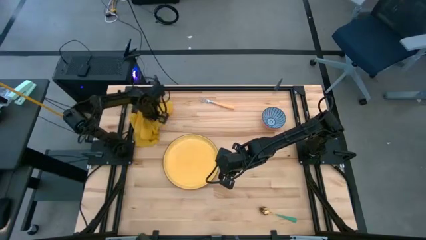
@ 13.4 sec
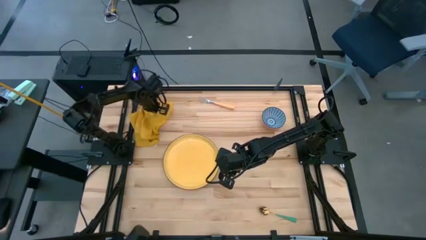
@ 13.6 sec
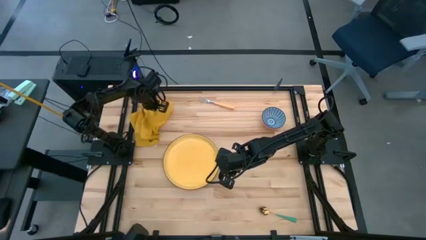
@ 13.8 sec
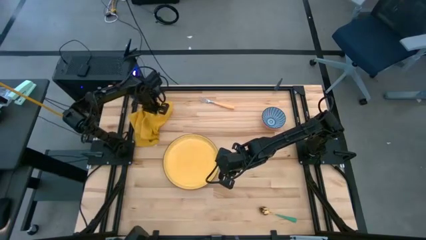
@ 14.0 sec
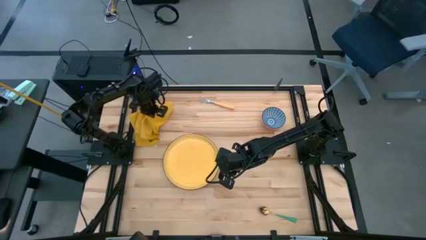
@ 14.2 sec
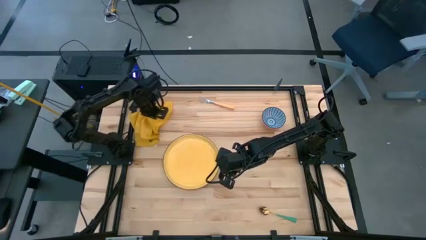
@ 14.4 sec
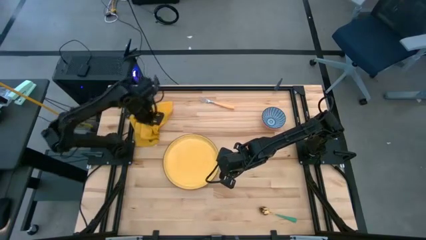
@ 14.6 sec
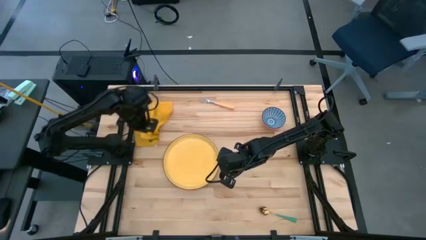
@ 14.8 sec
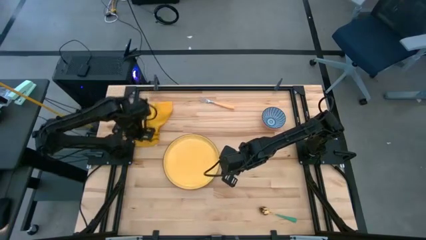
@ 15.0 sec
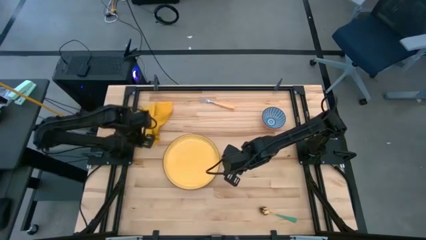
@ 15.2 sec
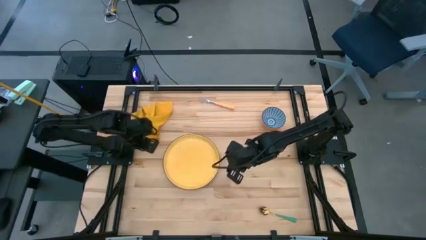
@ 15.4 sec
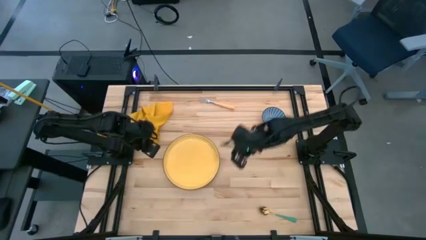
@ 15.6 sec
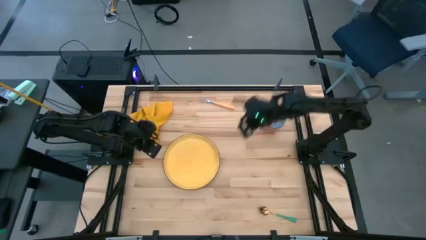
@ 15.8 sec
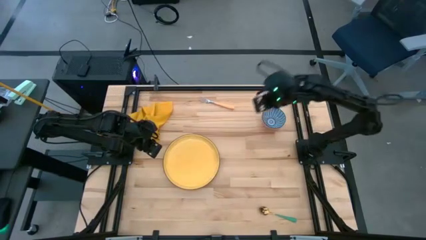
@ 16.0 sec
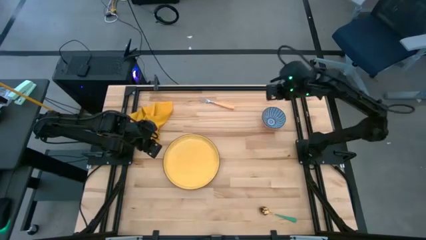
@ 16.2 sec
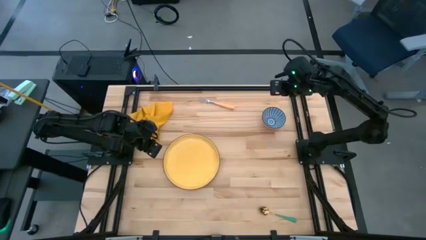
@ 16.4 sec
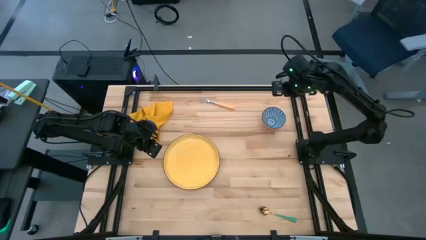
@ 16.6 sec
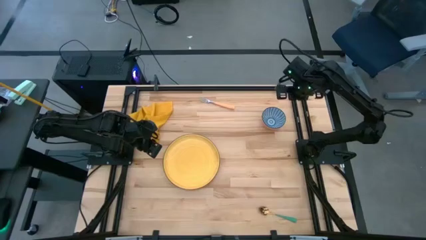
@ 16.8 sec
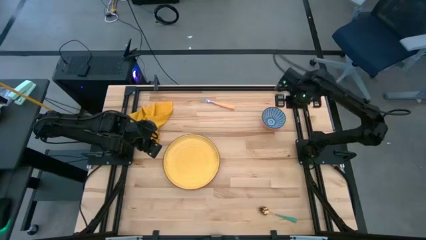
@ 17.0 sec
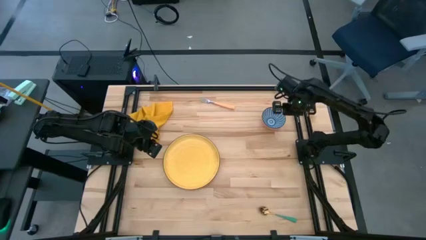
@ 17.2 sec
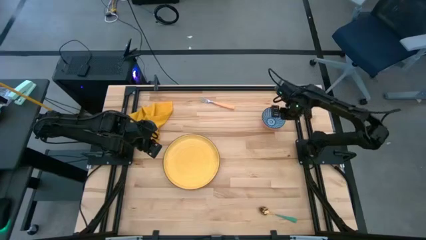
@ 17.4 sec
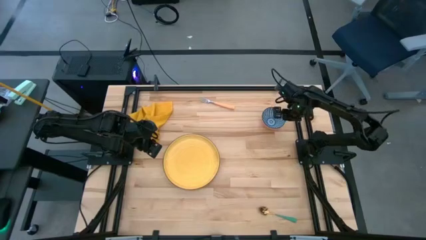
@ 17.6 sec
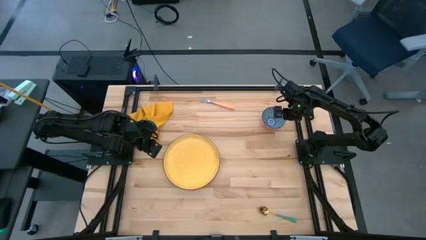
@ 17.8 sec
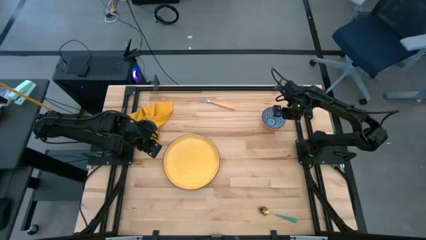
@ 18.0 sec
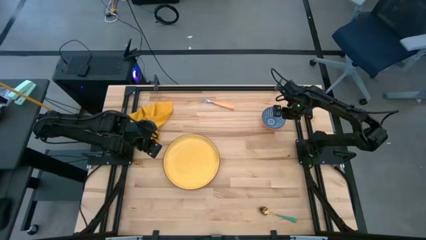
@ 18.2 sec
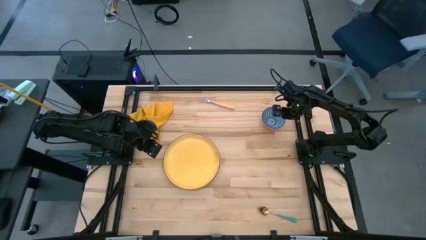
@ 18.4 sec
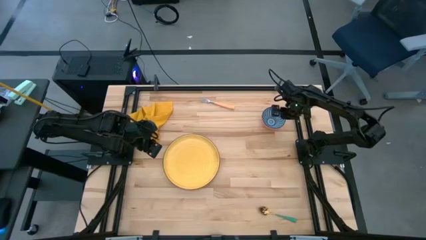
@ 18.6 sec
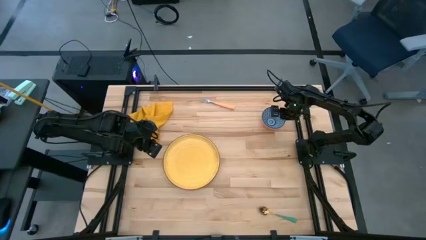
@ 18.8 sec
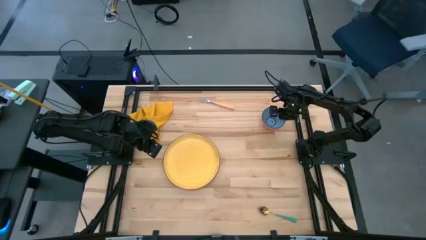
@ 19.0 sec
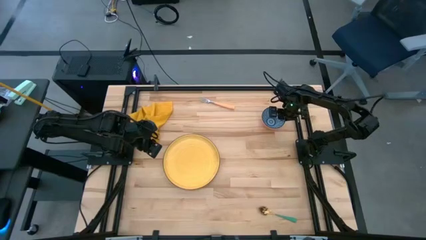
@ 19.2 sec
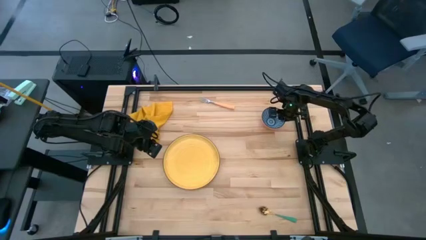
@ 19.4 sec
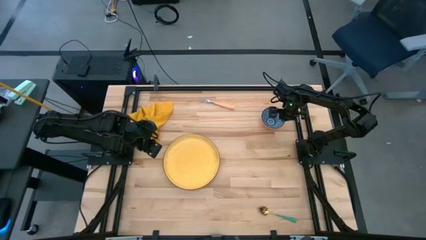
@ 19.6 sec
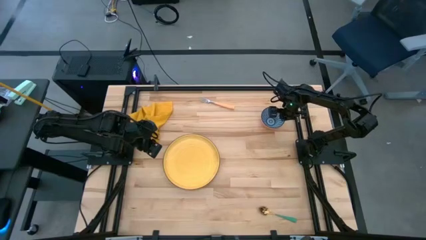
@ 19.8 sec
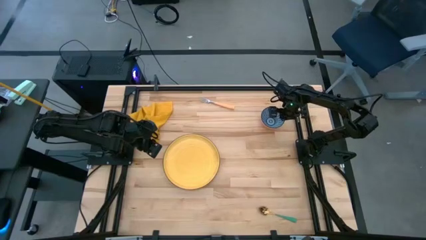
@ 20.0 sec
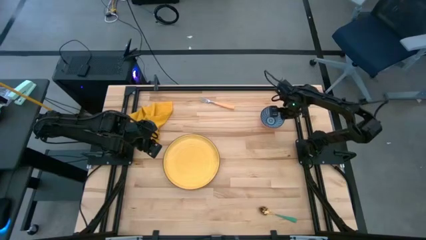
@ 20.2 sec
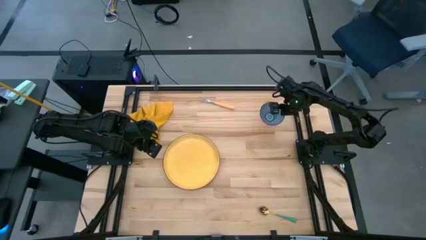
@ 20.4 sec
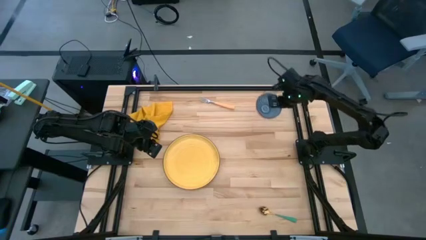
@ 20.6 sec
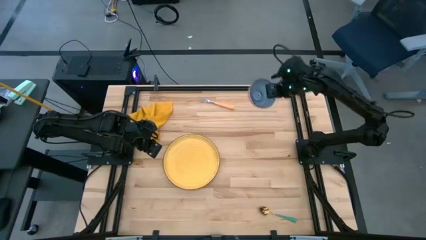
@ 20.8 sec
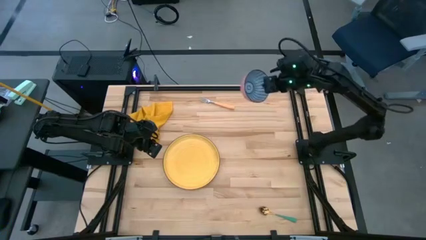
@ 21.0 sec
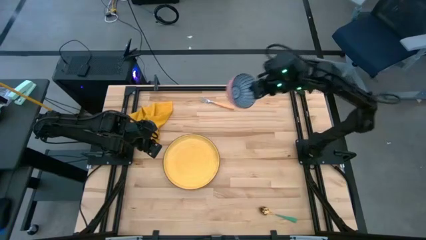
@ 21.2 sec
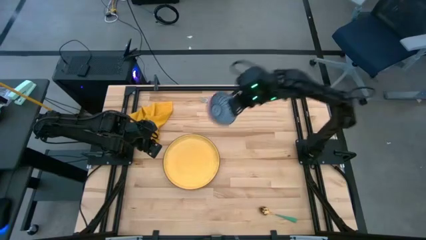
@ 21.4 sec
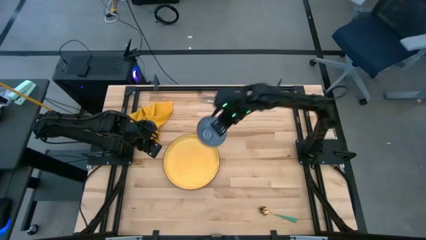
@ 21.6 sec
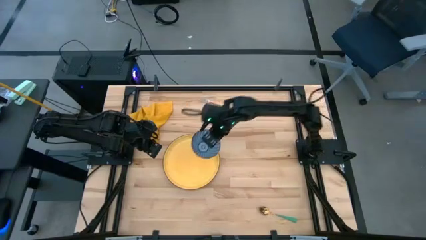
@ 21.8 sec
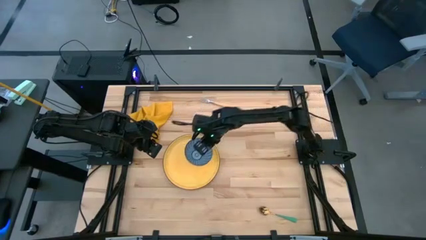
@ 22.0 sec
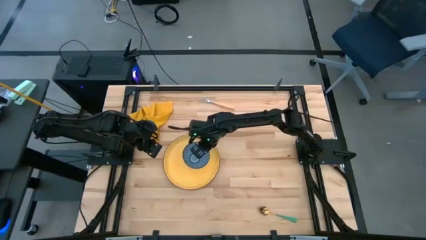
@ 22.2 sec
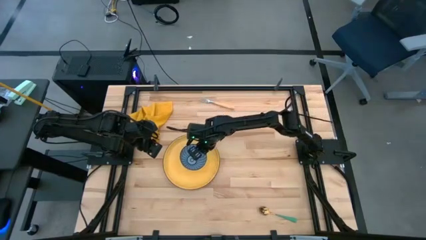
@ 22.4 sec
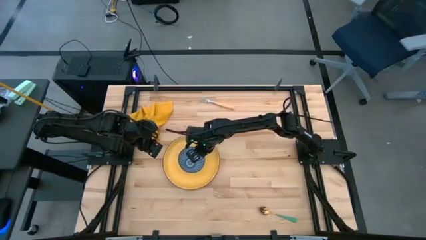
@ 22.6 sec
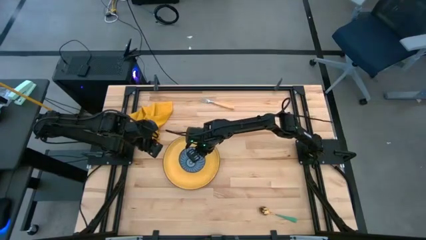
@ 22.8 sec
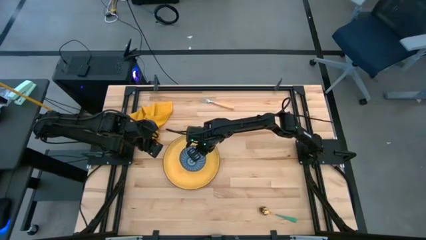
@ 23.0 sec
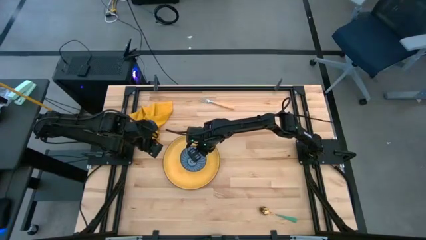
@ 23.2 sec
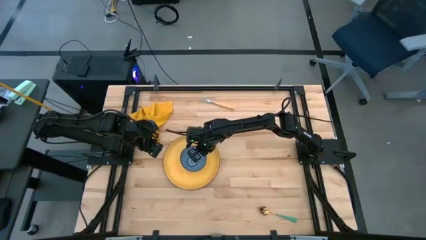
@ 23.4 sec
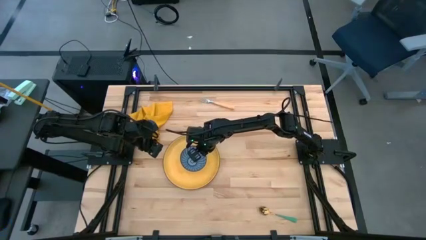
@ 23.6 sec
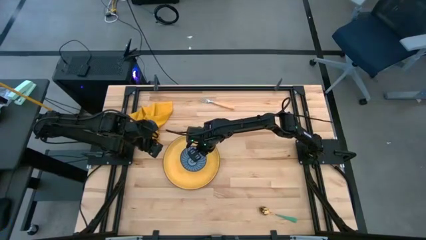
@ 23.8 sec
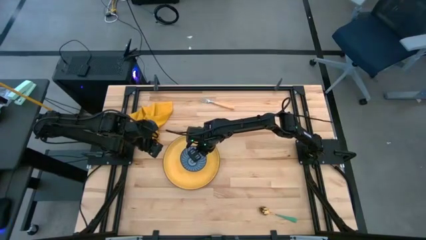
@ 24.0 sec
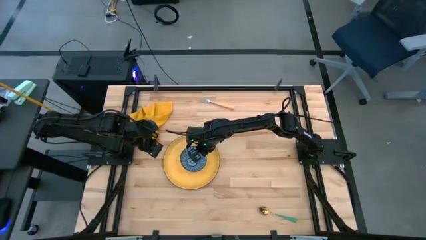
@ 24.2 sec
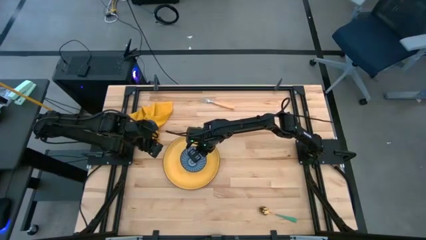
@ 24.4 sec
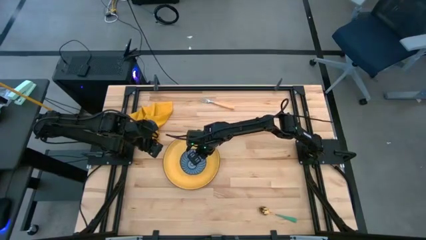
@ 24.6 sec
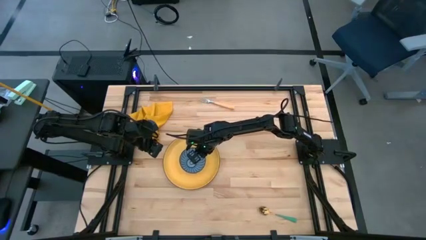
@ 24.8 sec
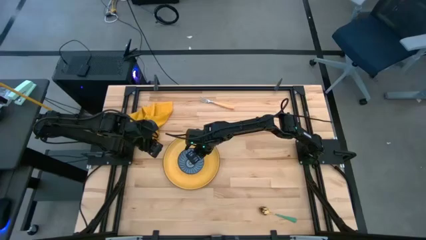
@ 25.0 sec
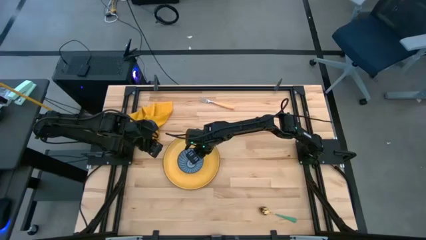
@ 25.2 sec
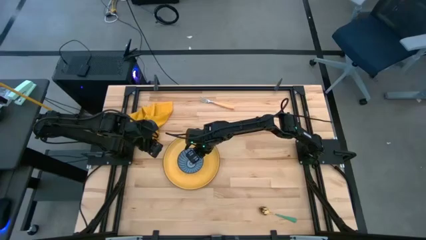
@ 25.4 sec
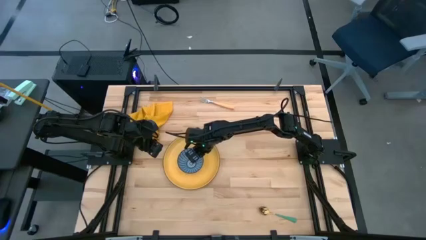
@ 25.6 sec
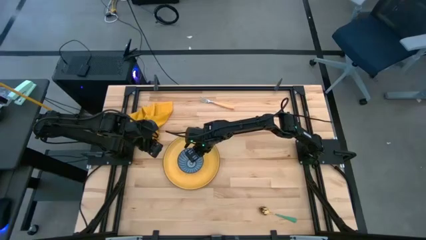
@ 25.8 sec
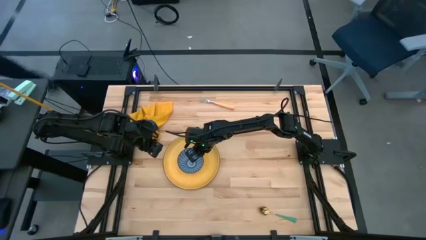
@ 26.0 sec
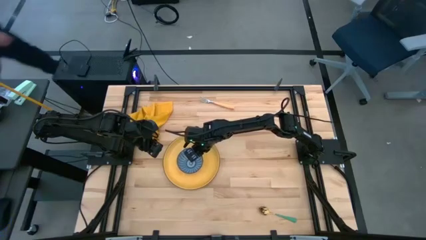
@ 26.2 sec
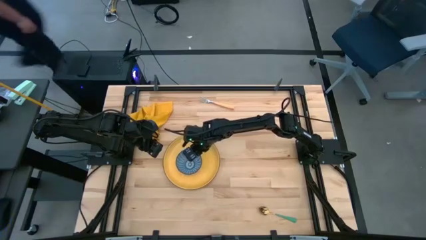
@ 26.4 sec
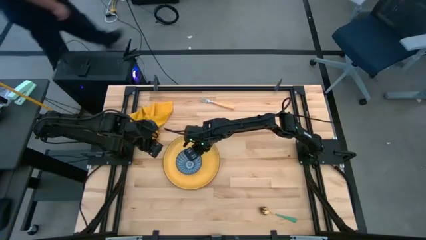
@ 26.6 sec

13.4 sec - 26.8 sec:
Task: Set table place
Put the blue-patterned bowl on top of the yellow plate
